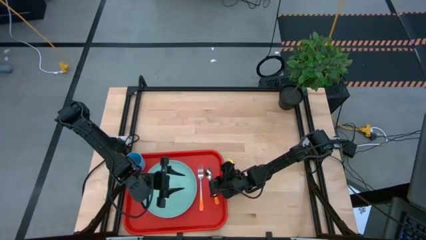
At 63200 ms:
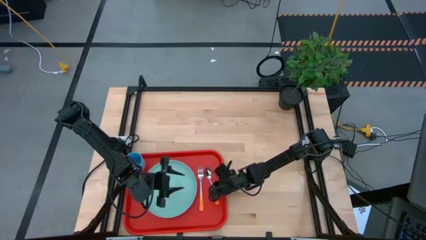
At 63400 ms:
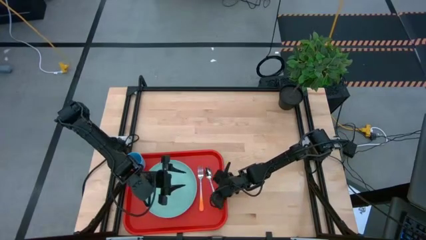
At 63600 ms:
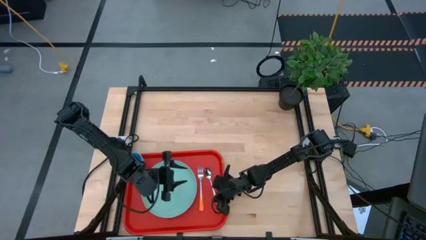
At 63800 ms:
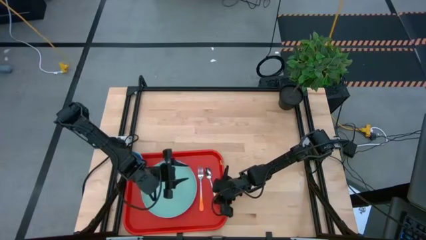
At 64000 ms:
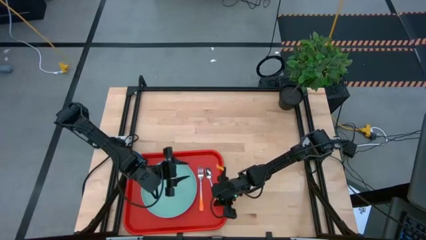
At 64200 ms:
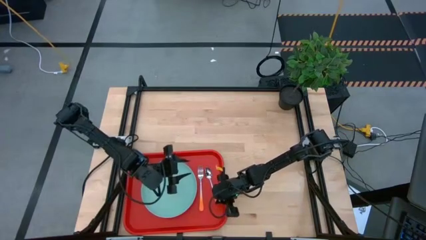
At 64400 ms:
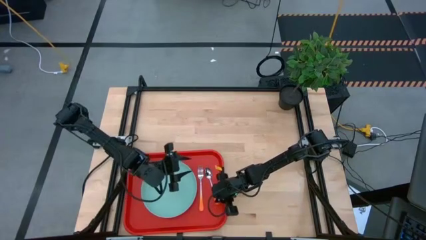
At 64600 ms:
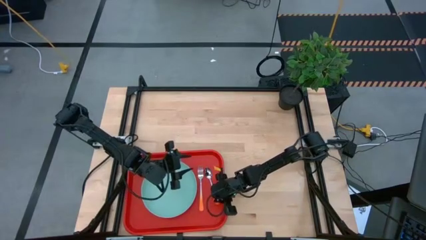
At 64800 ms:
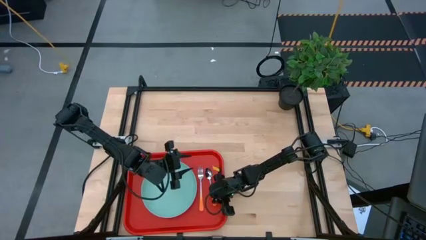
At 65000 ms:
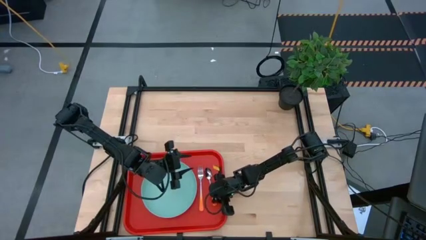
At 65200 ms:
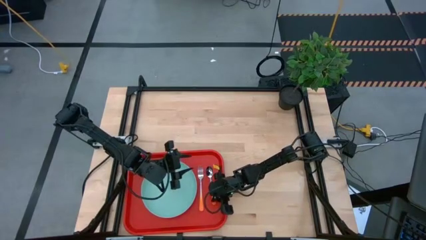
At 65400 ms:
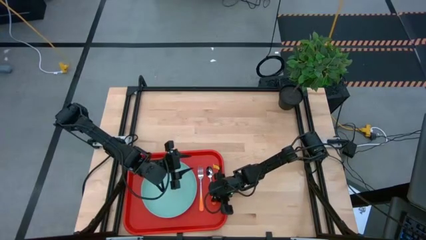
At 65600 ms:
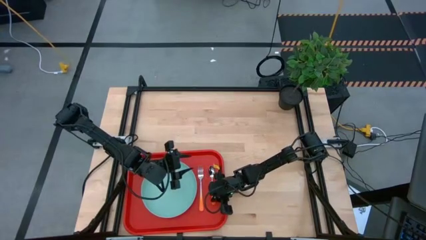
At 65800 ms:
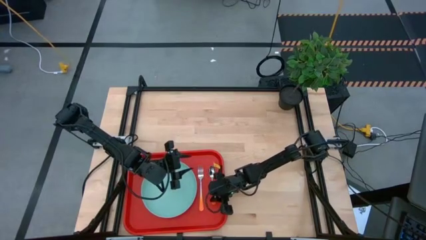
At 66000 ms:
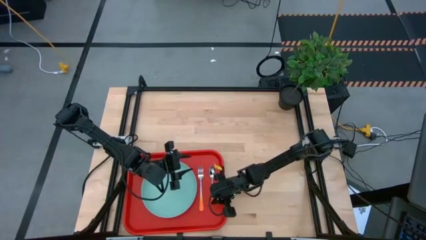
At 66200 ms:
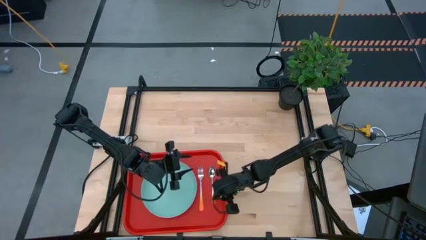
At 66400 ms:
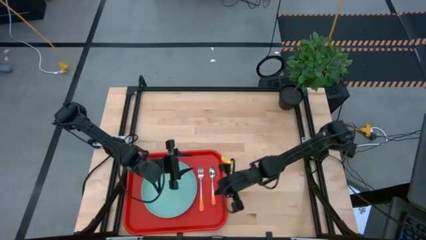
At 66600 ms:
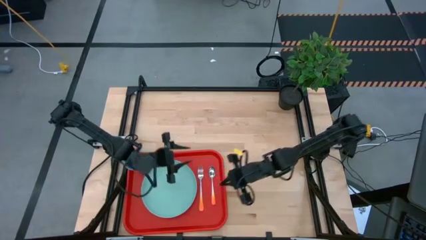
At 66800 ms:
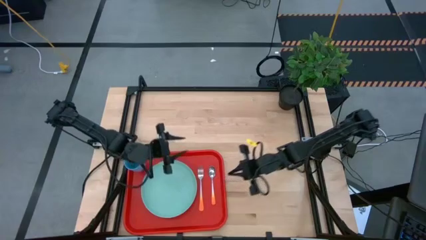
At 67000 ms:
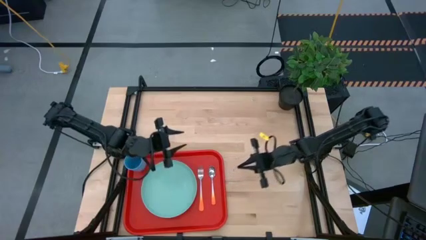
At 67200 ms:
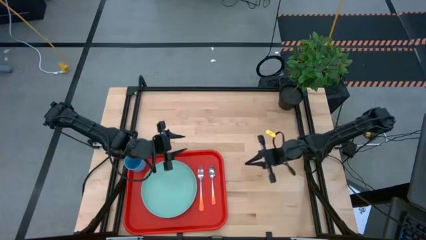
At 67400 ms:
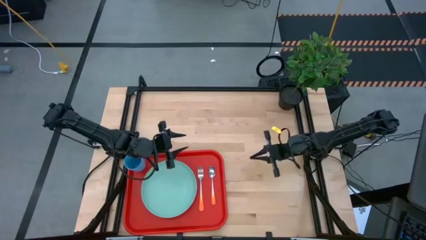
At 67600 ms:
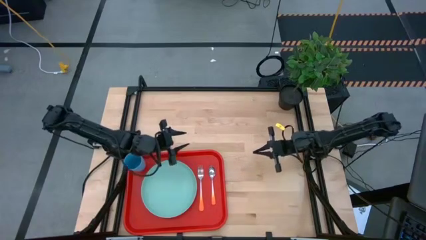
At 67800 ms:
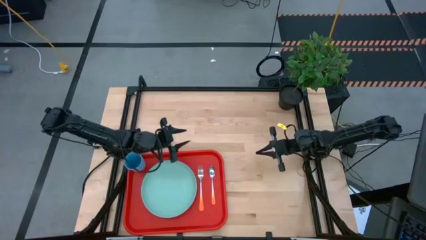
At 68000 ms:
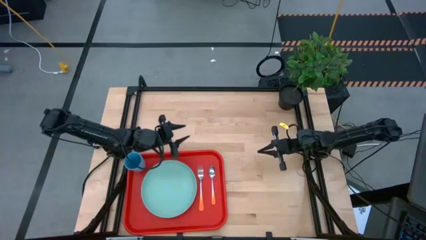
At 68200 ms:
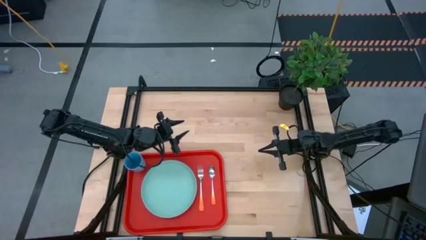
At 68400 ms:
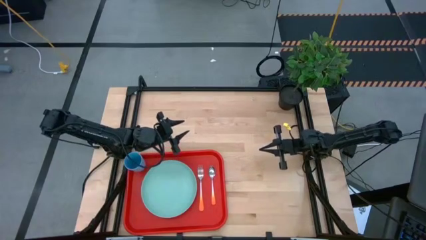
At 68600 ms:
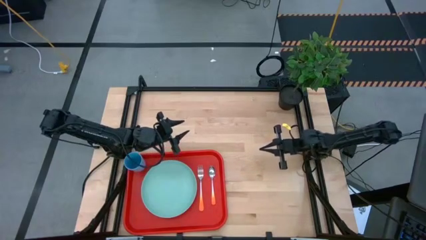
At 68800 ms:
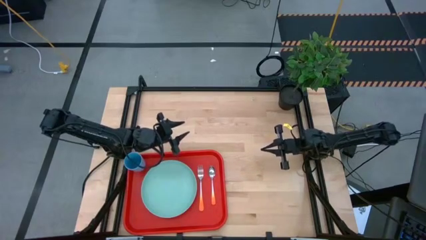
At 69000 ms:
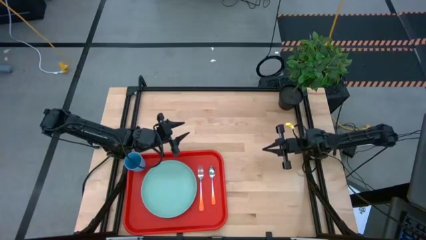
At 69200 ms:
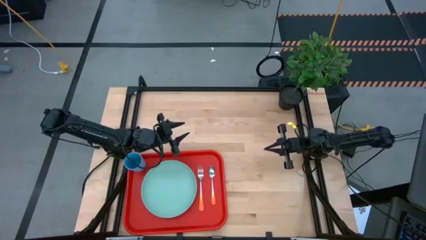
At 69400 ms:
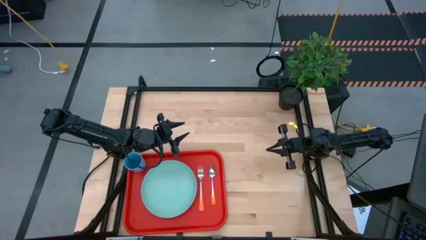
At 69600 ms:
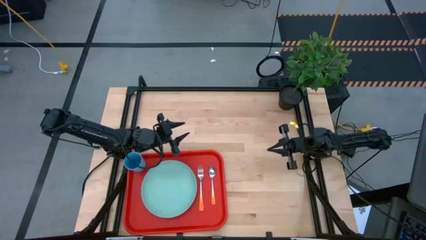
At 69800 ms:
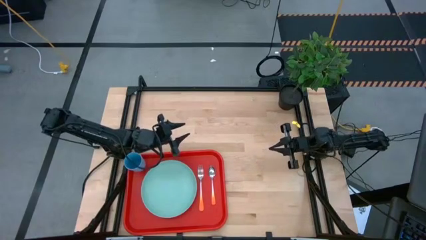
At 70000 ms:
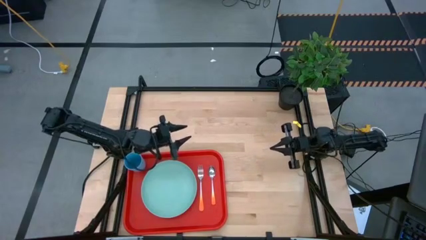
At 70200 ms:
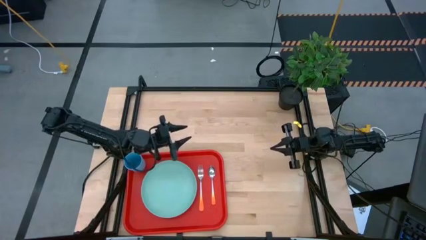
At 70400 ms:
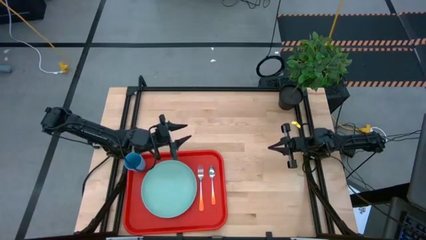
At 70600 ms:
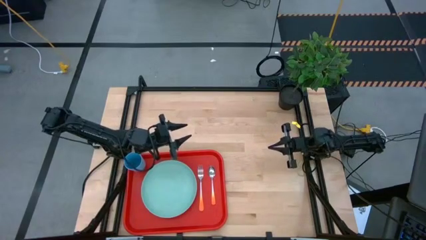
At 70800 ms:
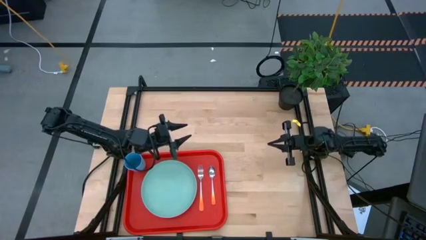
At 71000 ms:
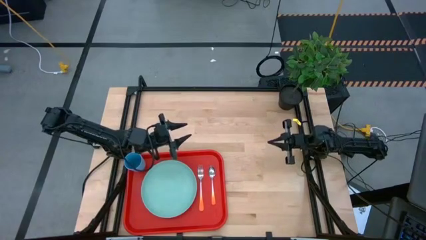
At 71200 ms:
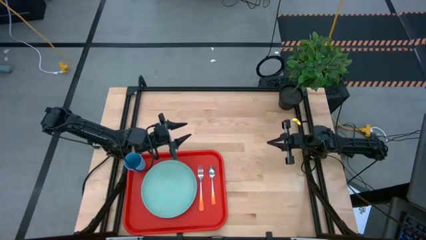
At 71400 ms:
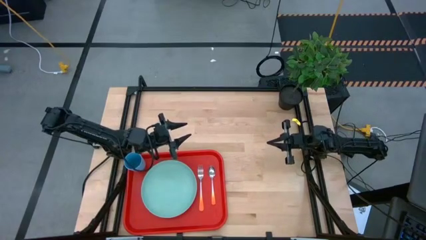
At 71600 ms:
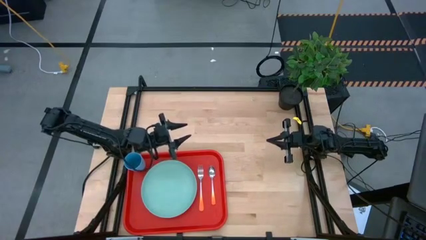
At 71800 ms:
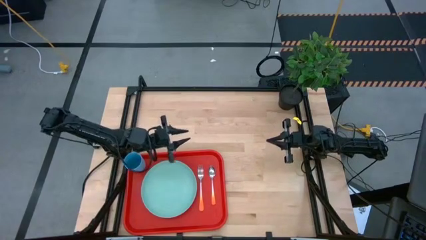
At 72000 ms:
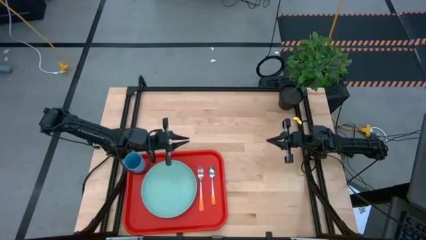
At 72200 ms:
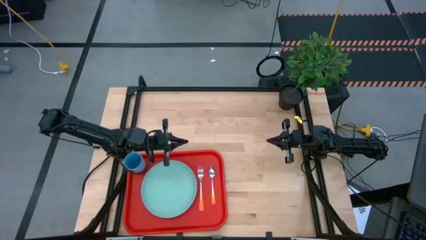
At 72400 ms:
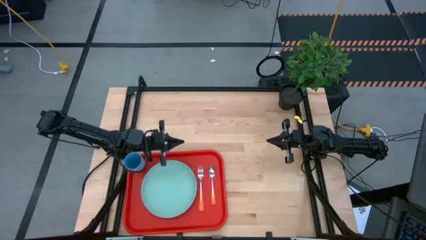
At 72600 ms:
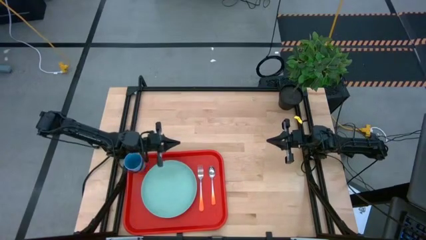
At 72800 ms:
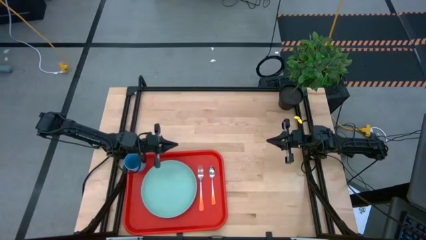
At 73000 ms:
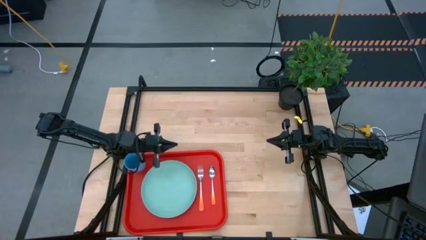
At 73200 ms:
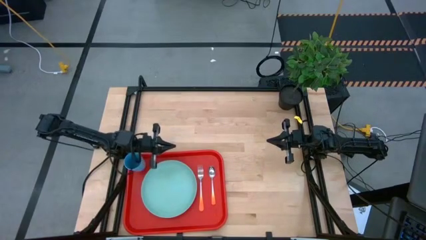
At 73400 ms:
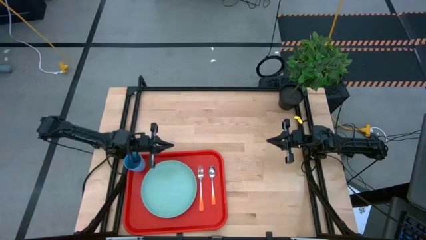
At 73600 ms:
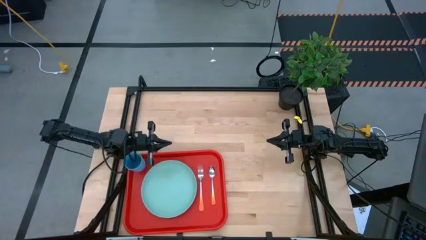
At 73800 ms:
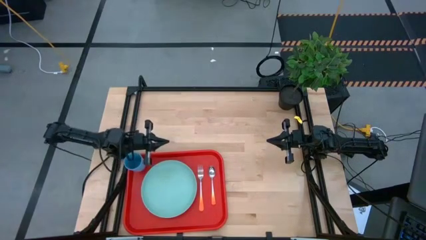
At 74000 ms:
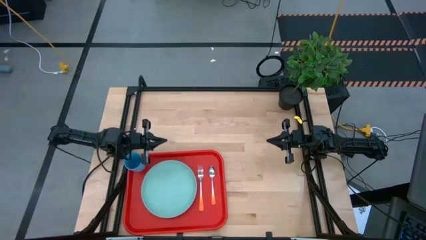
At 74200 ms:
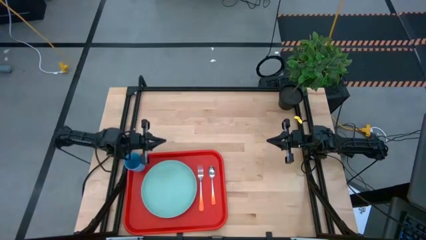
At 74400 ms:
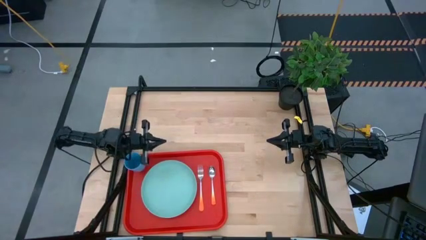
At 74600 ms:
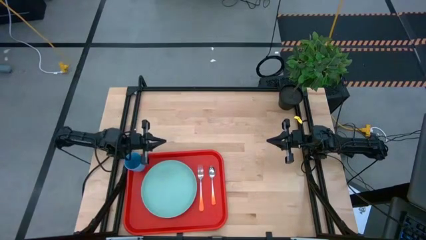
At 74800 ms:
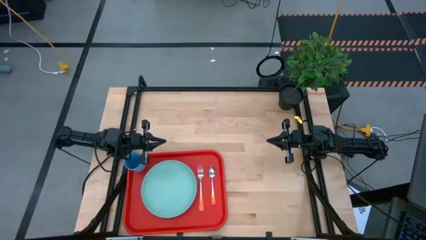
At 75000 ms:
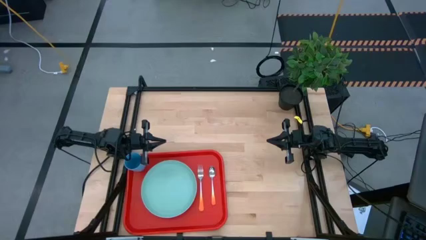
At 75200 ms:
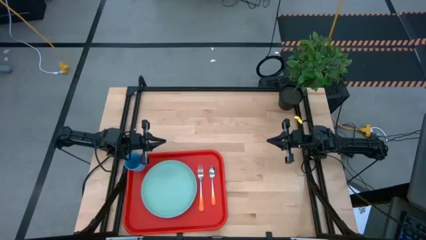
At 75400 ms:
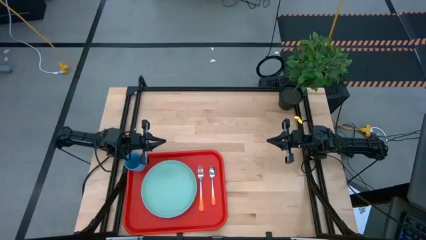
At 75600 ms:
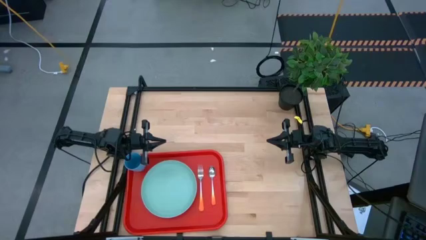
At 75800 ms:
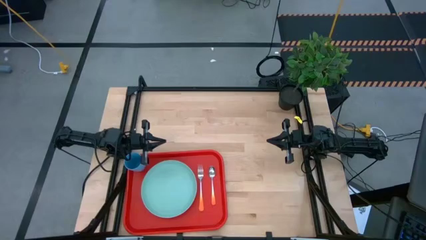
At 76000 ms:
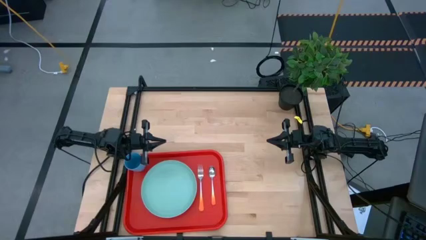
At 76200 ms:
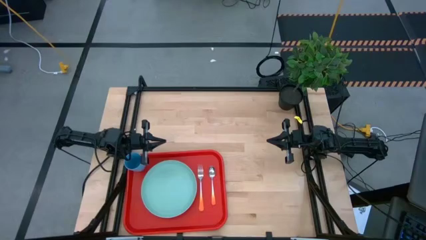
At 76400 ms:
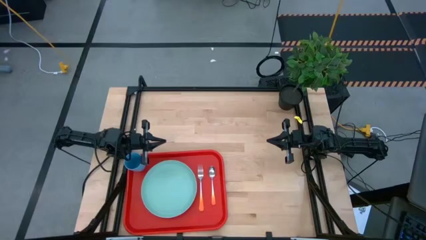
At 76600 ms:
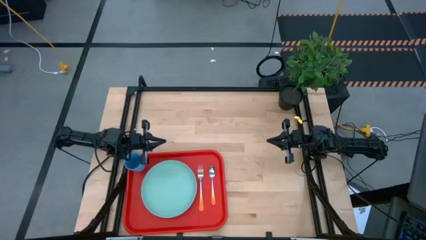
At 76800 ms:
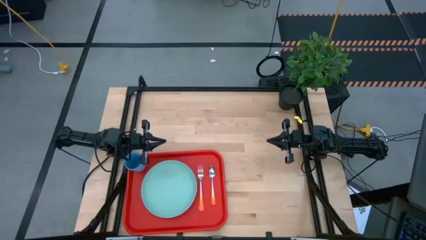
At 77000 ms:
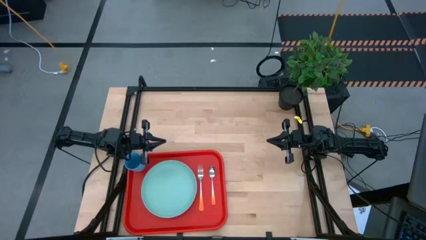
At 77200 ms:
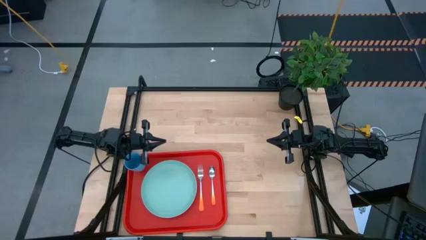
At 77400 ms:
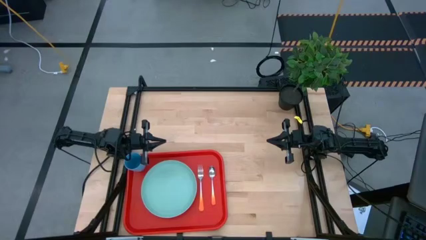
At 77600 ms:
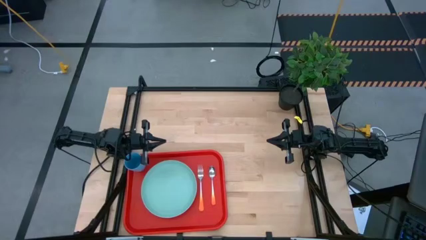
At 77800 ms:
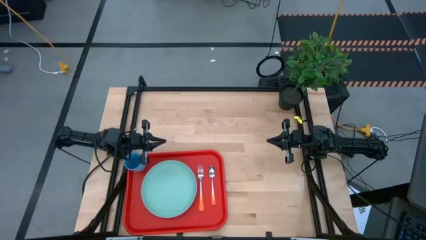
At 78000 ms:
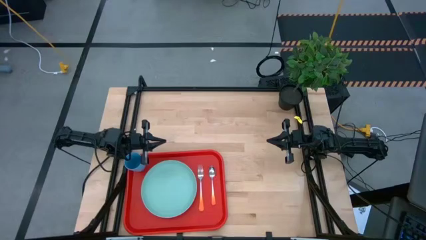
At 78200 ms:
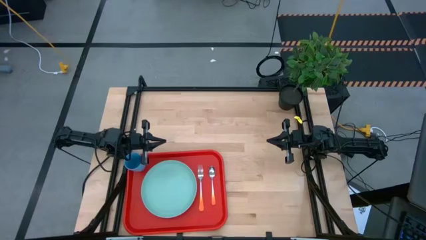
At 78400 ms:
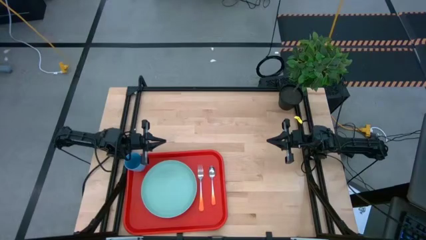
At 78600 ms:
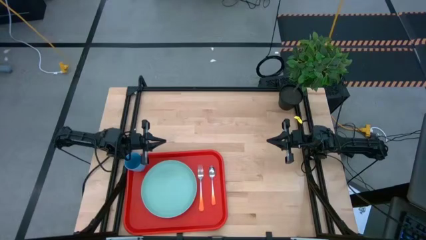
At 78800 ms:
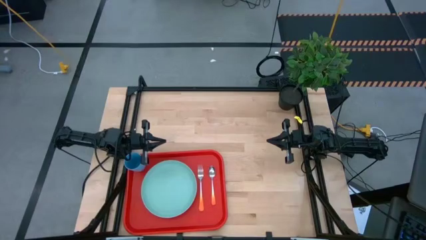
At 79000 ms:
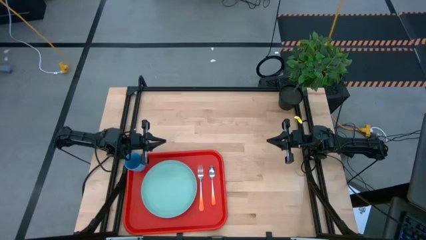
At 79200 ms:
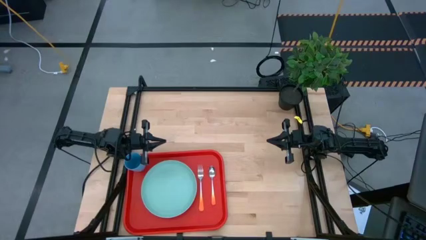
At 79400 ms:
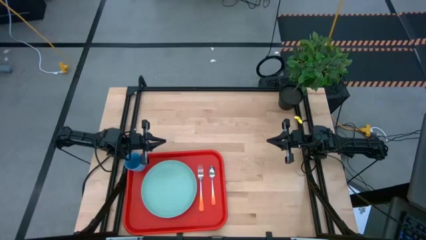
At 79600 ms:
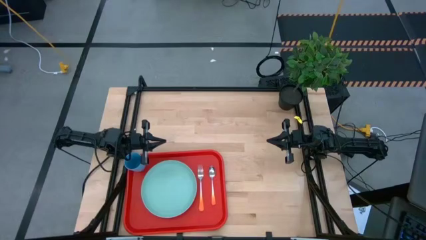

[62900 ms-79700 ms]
Task: Pick and place plate/cup/fork/spoon on tray
Return to Home Position

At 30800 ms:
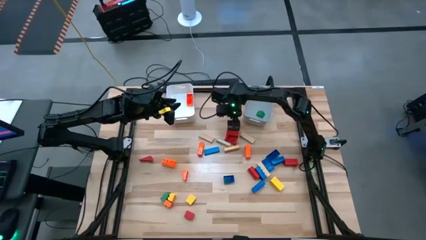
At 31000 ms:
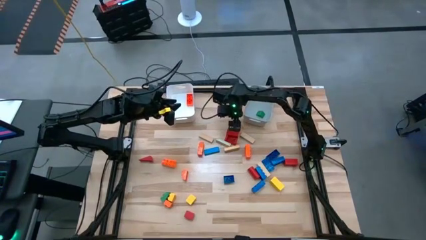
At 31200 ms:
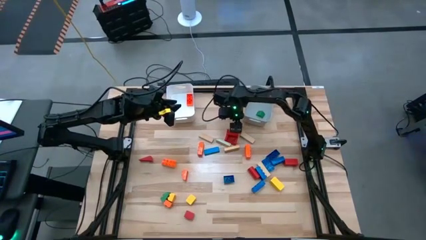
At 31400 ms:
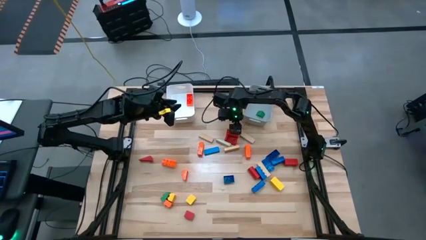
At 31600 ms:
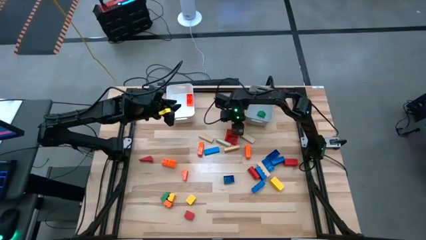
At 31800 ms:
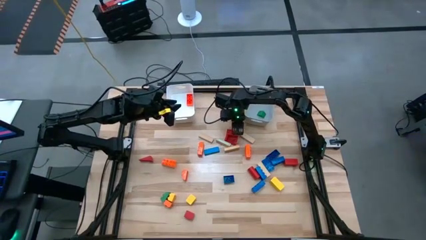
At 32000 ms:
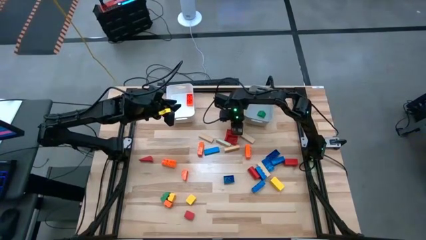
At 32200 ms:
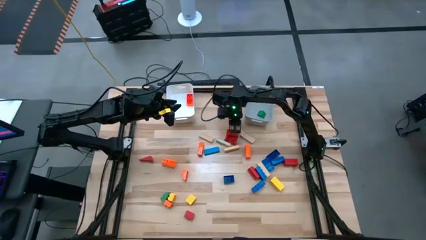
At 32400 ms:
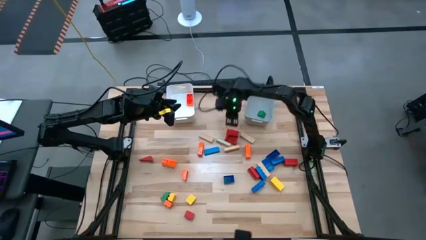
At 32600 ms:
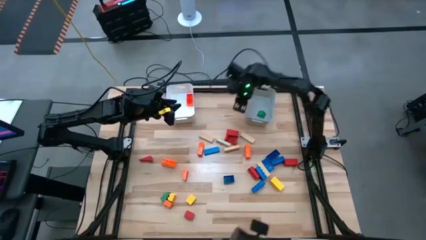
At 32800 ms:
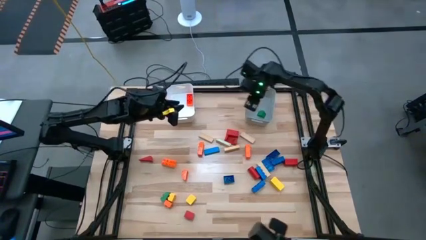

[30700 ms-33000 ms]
Task: Sort blocks by size
Put the red triangle wooden block into the gray bin
